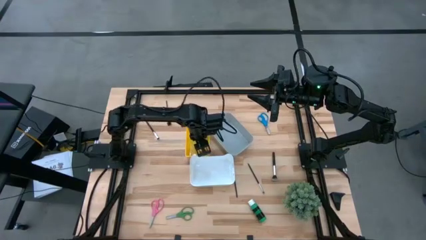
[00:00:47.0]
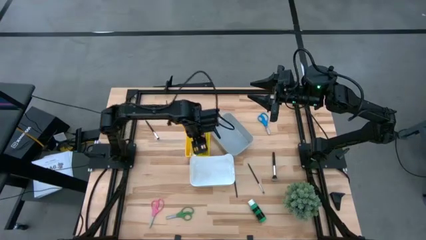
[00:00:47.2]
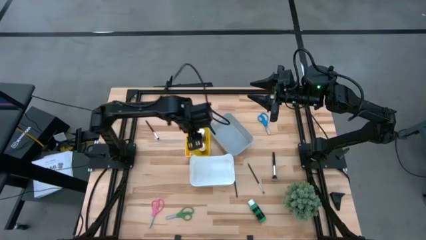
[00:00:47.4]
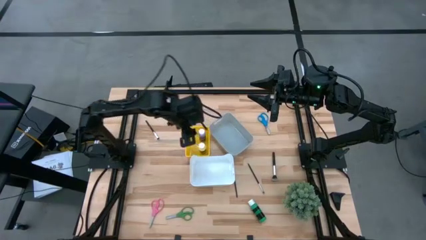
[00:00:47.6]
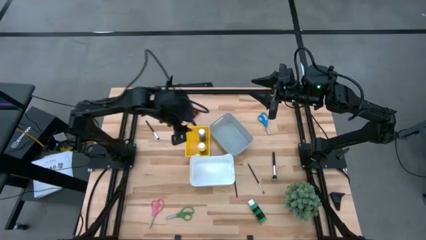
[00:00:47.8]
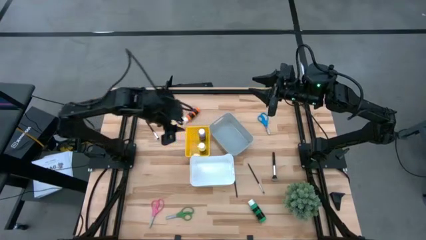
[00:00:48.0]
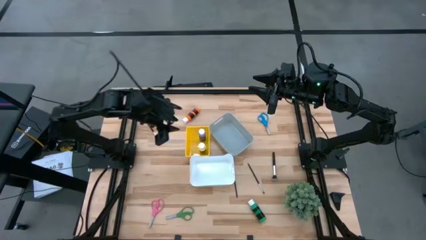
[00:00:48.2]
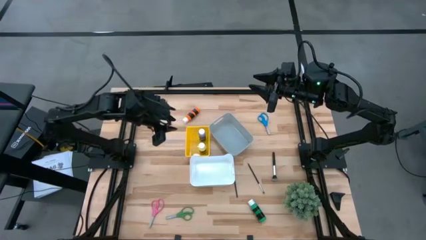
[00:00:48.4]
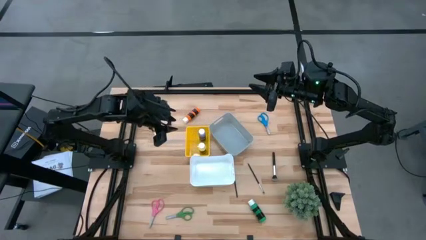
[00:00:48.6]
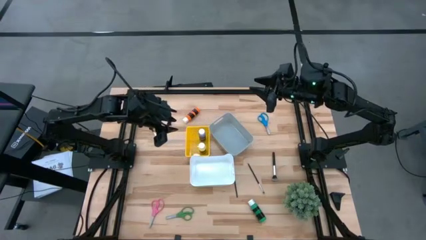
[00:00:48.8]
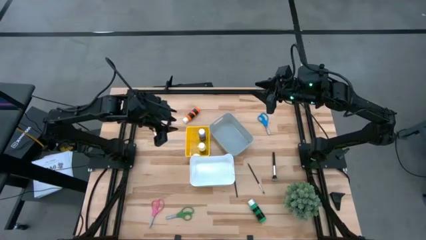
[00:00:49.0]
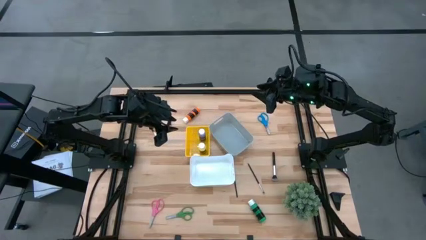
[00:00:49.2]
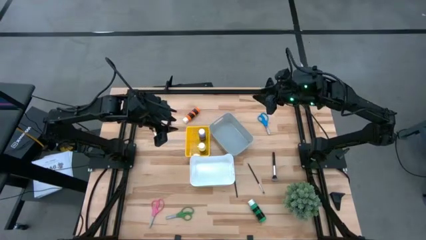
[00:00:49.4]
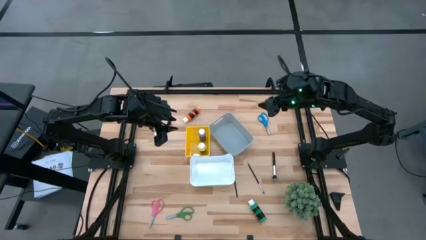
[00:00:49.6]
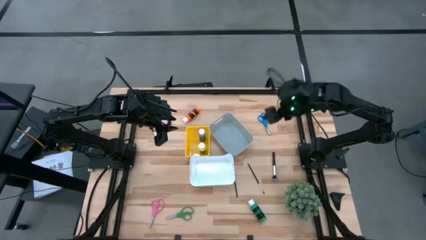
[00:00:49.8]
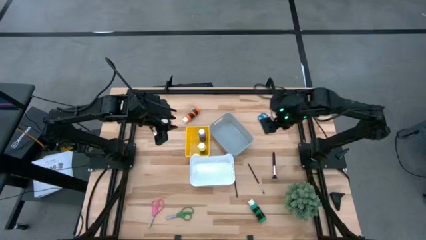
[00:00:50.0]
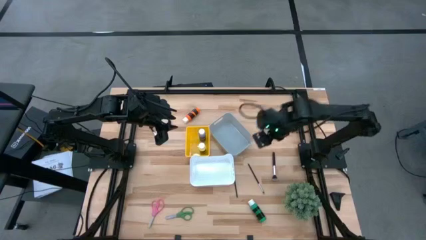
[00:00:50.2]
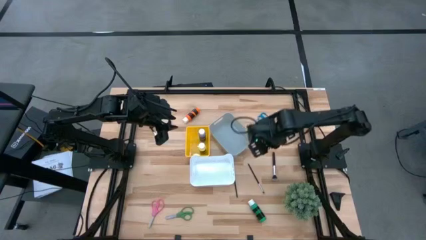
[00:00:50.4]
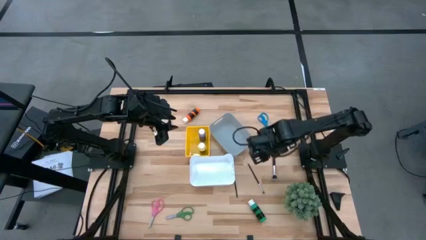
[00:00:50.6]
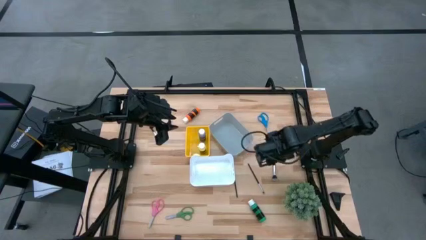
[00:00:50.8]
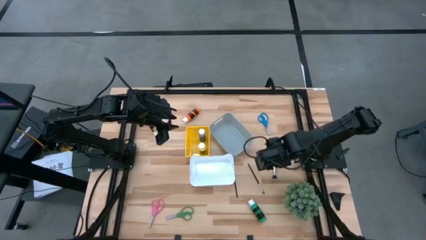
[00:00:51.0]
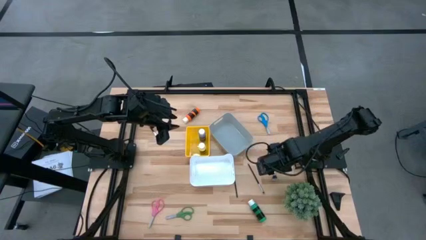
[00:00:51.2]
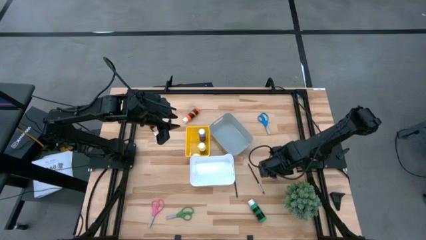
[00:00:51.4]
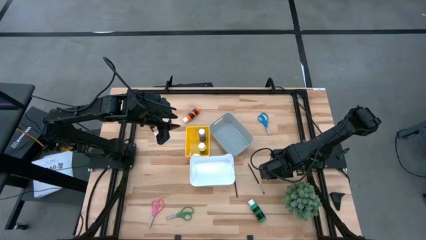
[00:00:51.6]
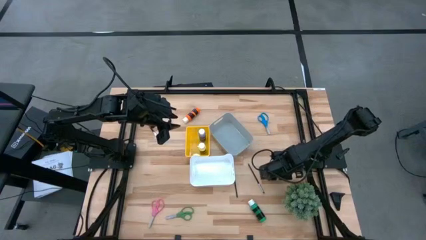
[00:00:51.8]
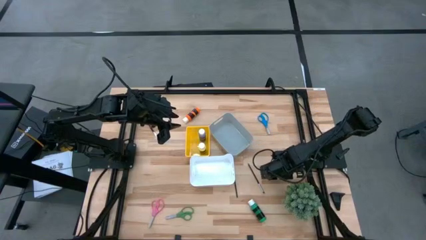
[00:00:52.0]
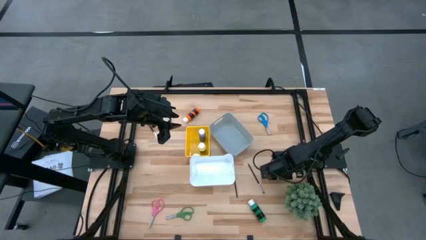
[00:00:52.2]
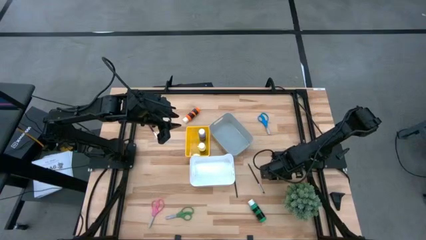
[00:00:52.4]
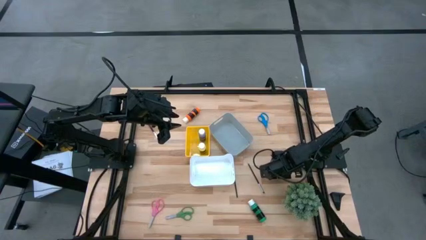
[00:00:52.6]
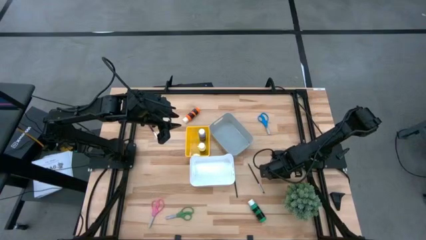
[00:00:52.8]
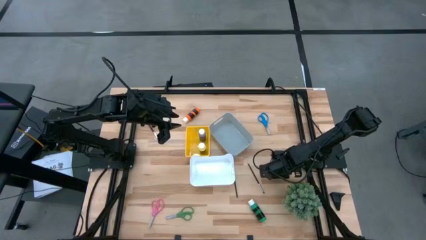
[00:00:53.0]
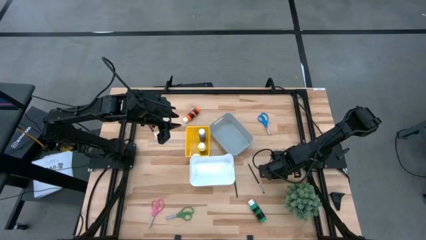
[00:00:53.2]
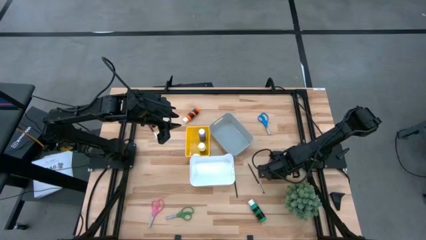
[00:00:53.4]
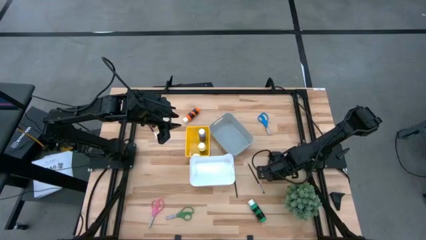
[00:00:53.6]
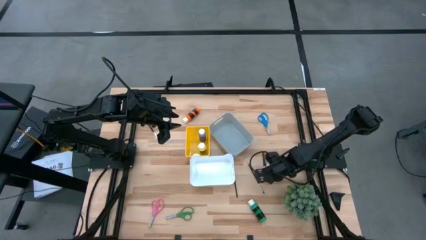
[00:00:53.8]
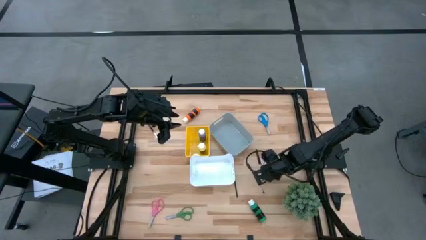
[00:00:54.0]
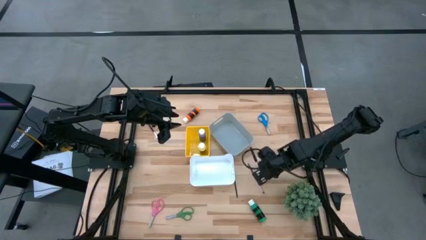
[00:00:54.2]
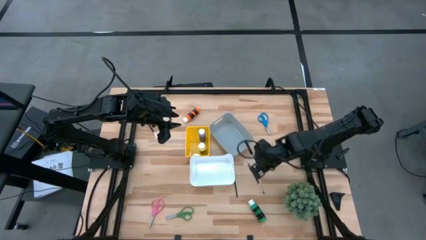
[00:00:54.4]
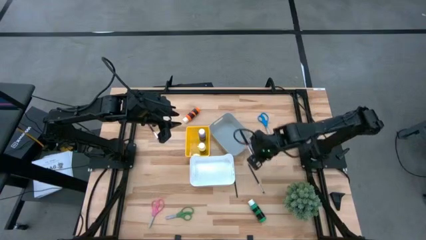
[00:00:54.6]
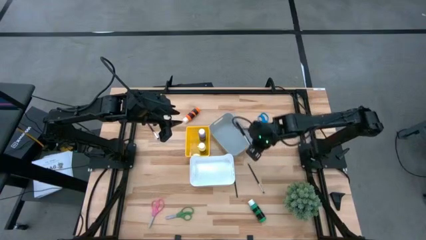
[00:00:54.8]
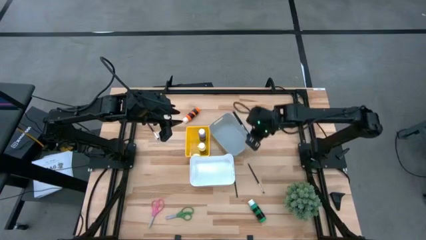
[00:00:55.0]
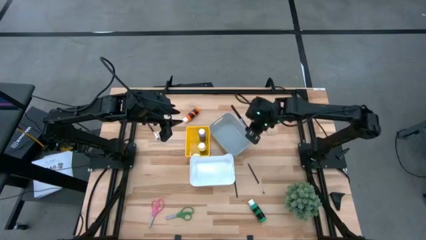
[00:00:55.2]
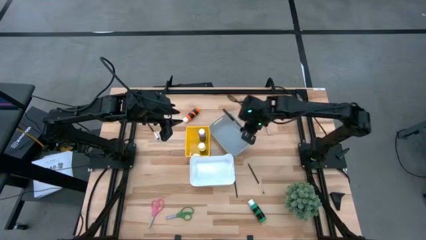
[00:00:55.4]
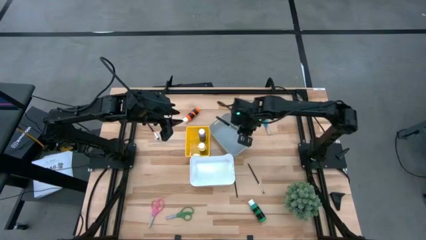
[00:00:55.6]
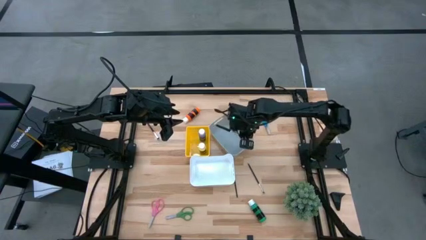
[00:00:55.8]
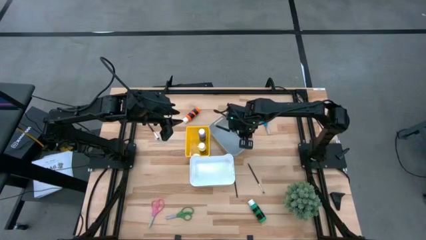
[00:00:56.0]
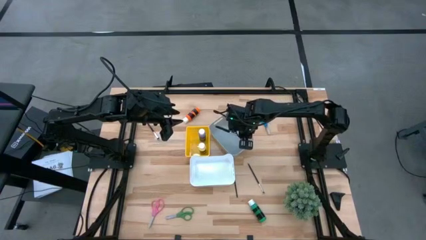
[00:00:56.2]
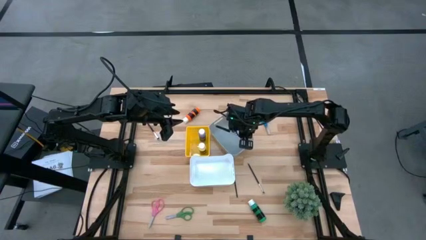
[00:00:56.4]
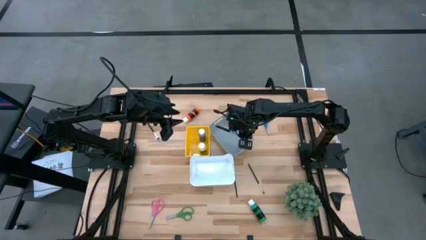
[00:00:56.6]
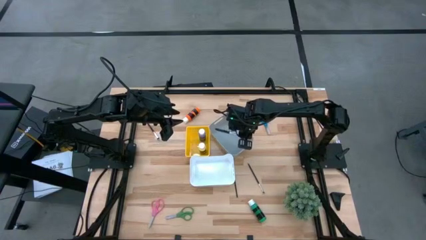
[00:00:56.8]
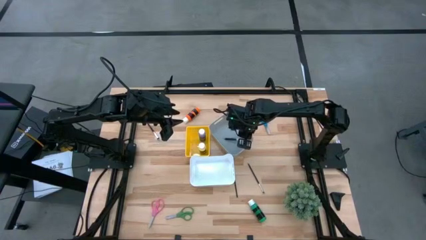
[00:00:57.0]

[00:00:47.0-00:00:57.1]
Task: Pick & Place Paint Supplies
Put the powder brush into the gray bin

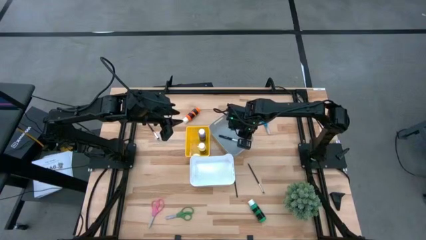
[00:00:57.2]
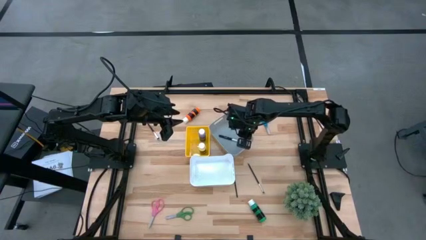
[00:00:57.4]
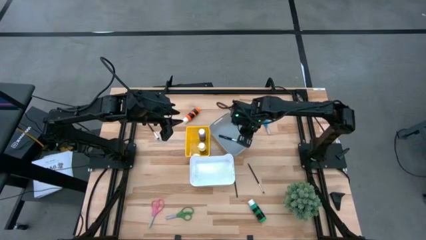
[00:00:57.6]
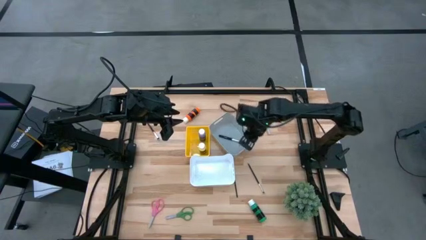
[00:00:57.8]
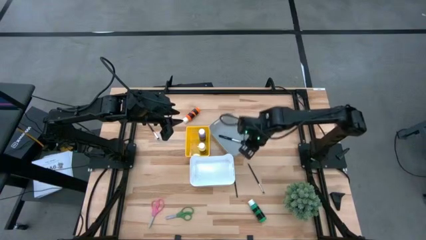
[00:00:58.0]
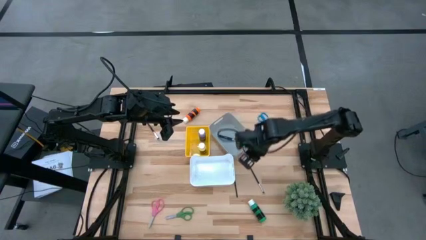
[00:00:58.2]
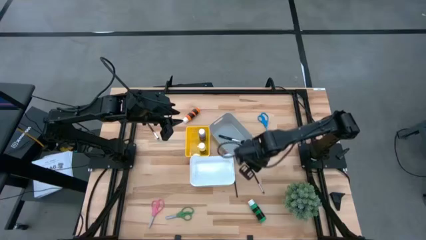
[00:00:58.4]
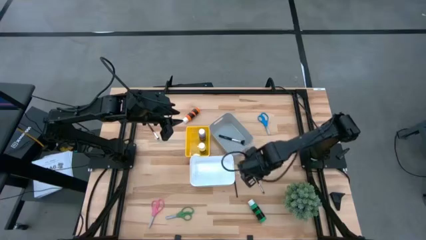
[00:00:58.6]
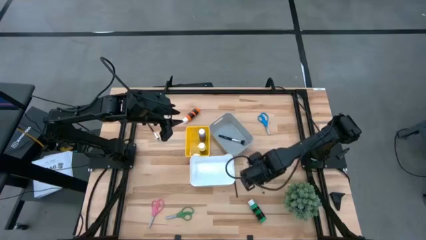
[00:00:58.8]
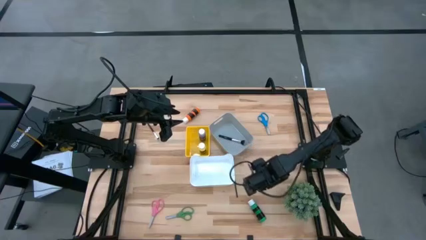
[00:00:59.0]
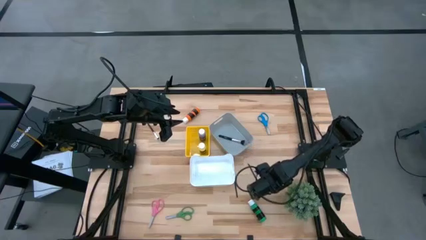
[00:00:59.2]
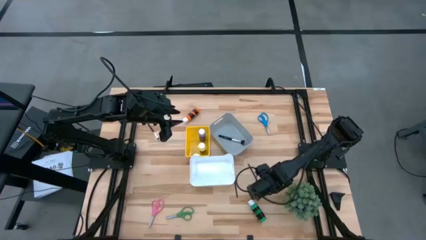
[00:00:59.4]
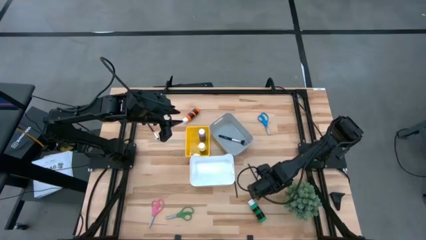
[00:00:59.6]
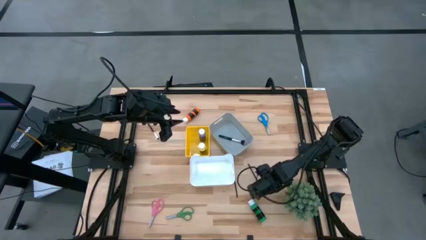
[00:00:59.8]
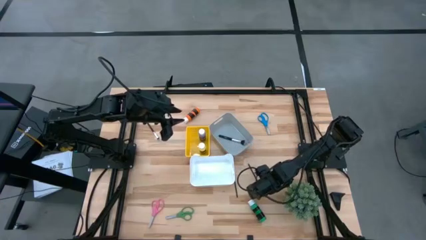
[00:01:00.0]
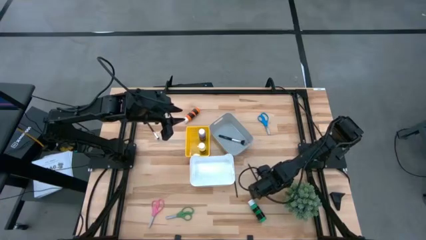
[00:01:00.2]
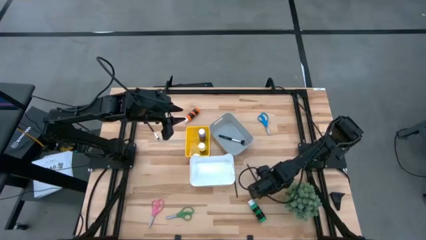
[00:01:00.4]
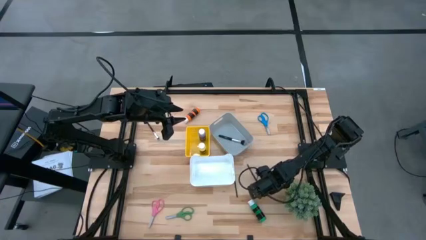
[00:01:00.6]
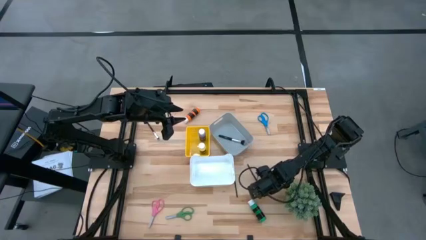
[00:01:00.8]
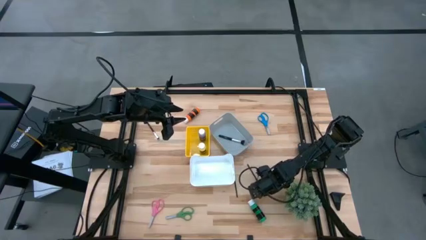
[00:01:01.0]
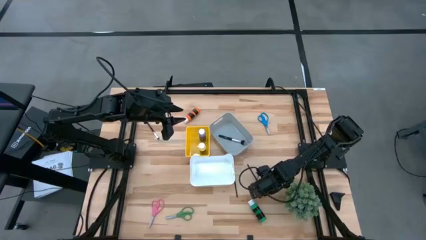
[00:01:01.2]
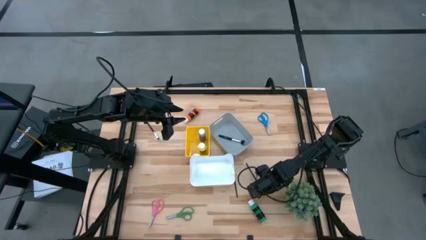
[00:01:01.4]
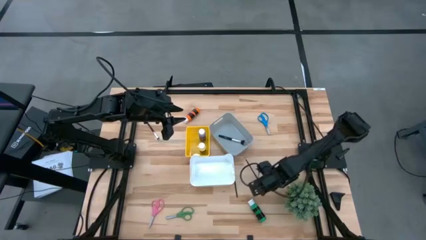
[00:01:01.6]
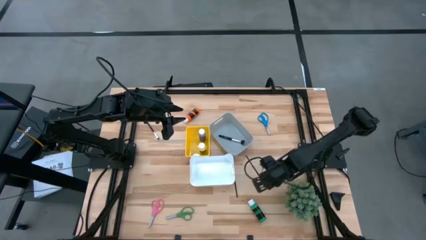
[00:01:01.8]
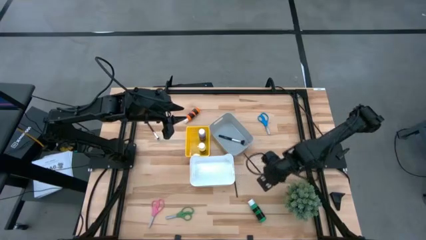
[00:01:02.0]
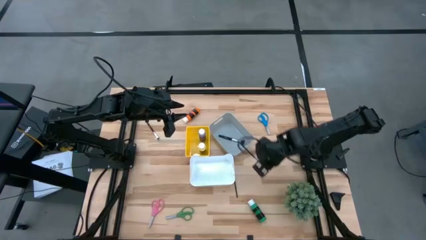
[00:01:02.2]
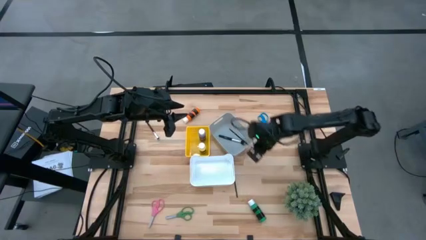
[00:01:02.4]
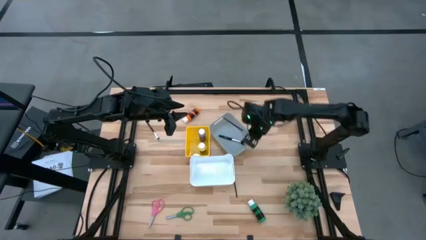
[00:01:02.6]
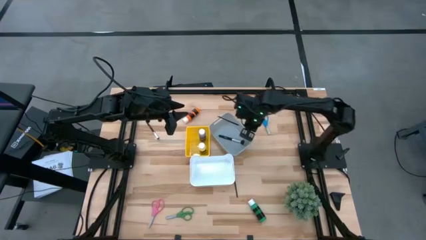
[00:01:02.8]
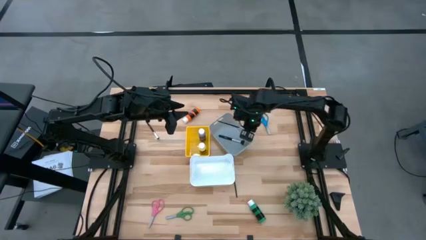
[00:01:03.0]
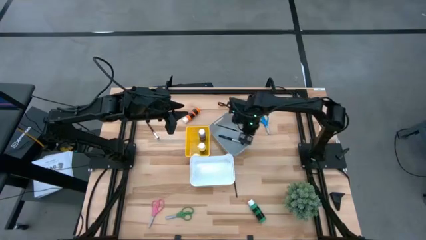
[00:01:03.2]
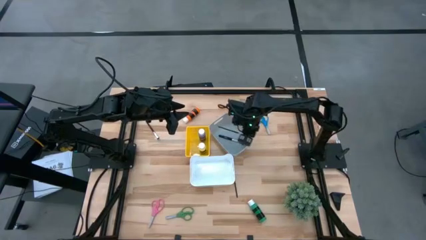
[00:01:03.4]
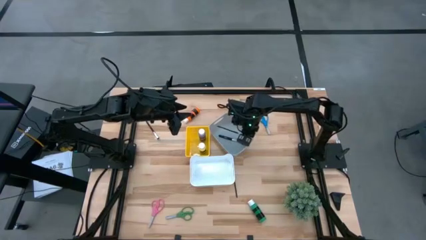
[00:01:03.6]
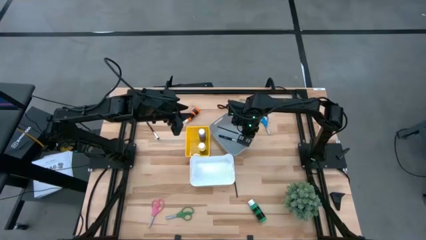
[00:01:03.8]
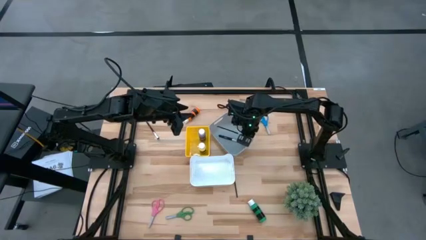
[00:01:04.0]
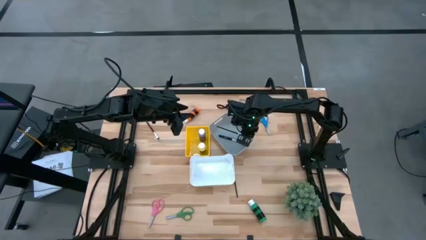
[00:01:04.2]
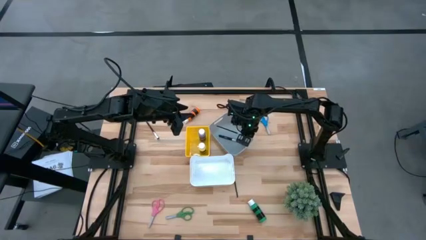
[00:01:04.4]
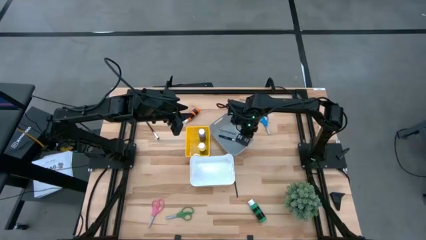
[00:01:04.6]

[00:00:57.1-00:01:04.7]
Put the eyeshadow brush into the gray bin
